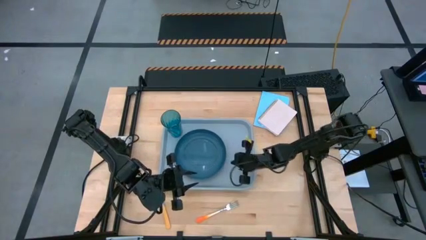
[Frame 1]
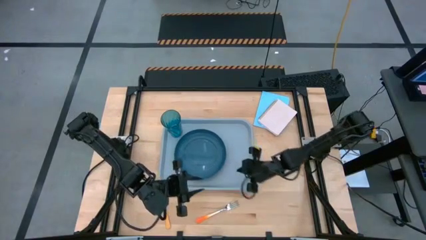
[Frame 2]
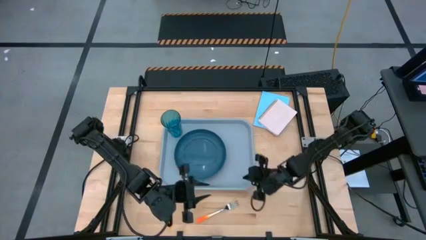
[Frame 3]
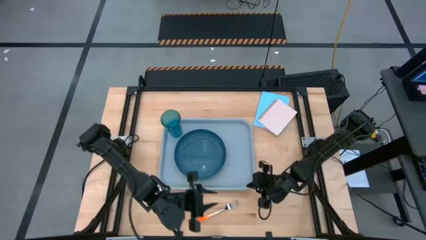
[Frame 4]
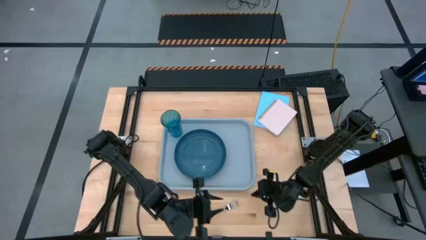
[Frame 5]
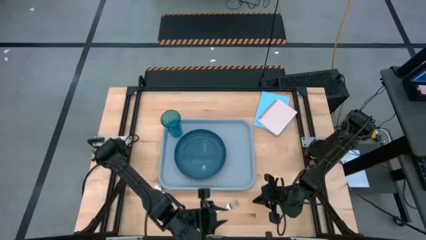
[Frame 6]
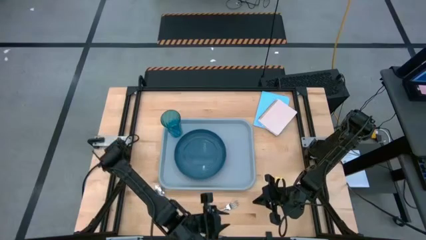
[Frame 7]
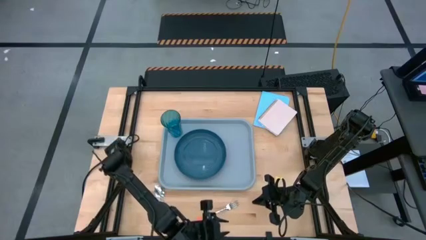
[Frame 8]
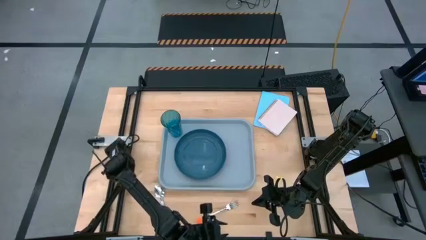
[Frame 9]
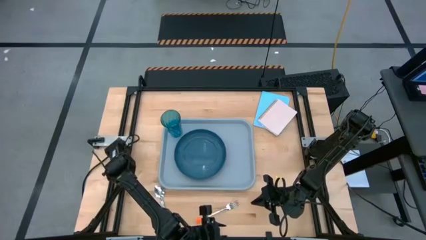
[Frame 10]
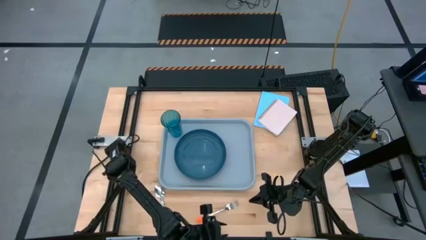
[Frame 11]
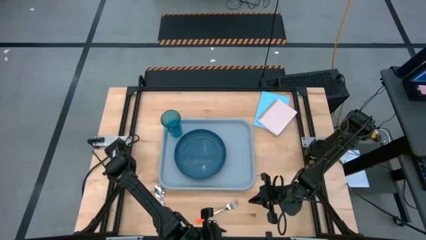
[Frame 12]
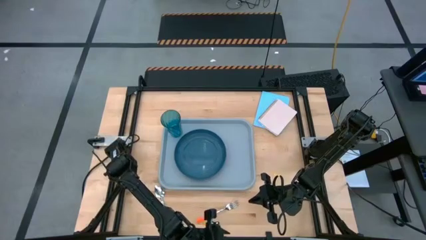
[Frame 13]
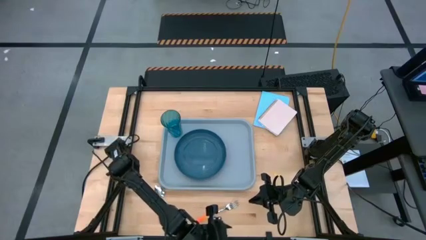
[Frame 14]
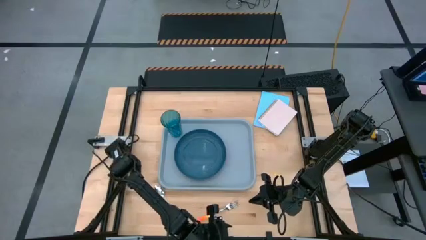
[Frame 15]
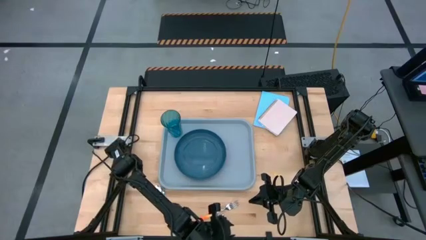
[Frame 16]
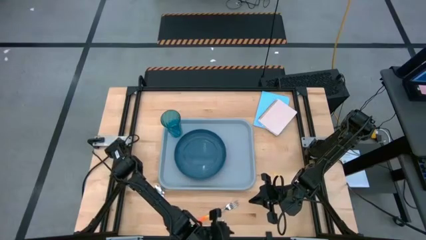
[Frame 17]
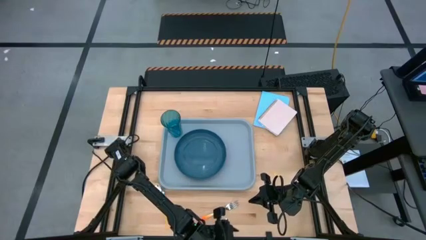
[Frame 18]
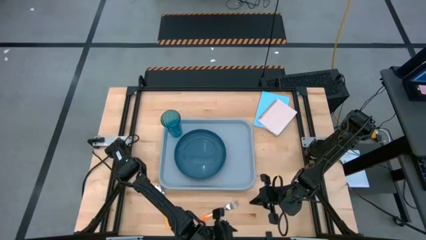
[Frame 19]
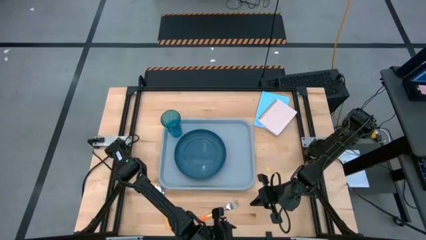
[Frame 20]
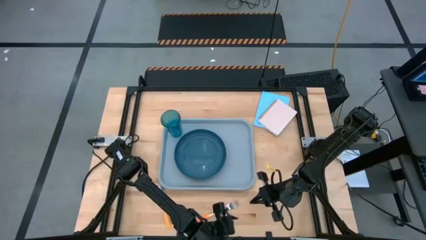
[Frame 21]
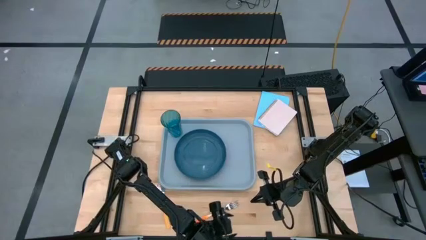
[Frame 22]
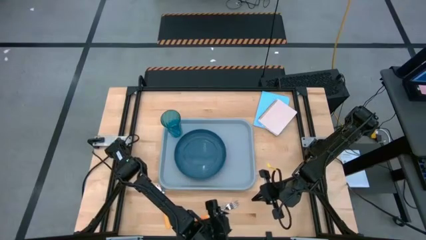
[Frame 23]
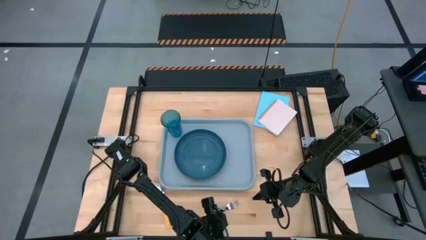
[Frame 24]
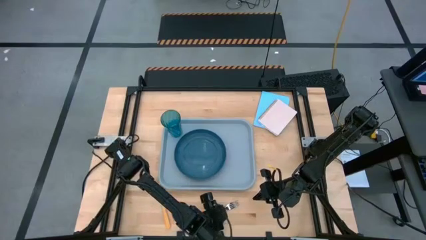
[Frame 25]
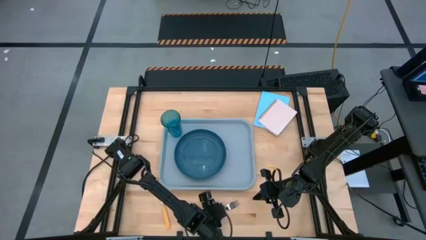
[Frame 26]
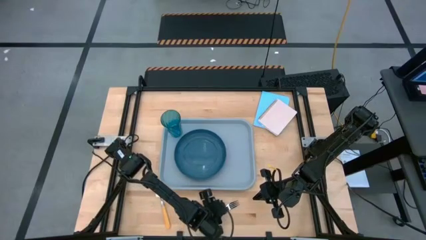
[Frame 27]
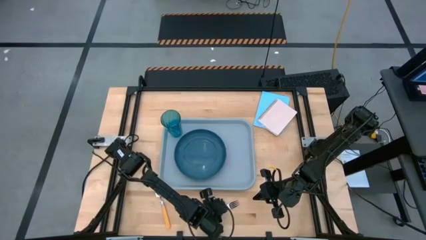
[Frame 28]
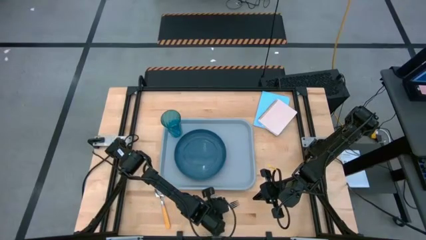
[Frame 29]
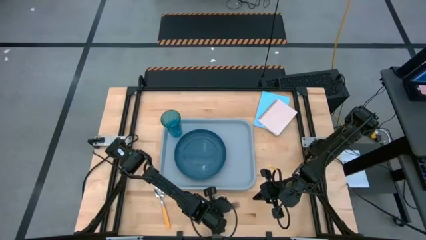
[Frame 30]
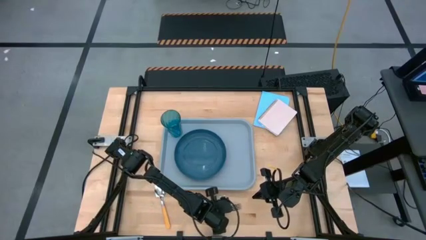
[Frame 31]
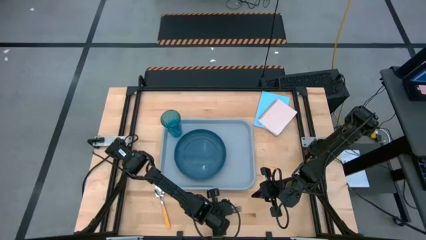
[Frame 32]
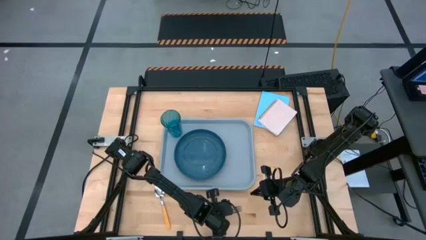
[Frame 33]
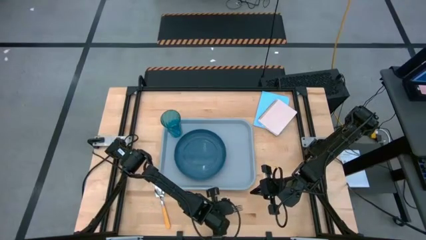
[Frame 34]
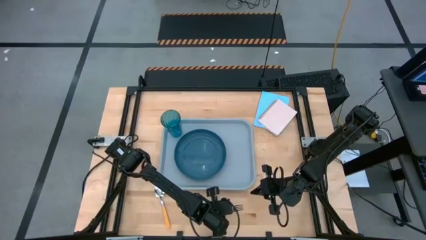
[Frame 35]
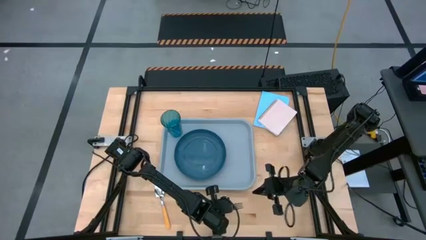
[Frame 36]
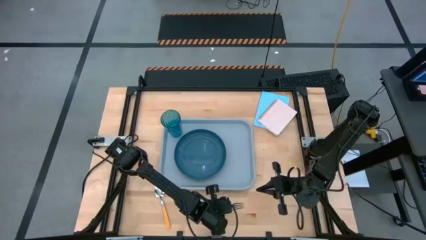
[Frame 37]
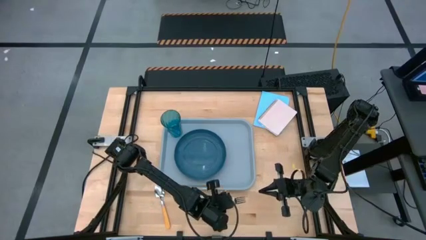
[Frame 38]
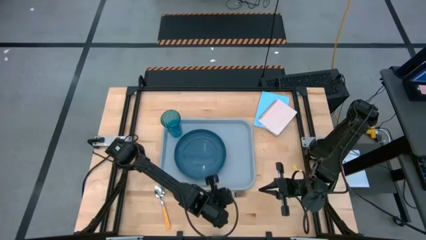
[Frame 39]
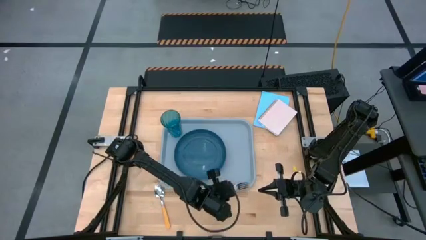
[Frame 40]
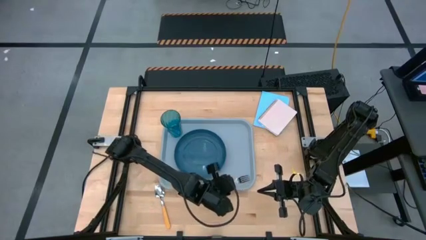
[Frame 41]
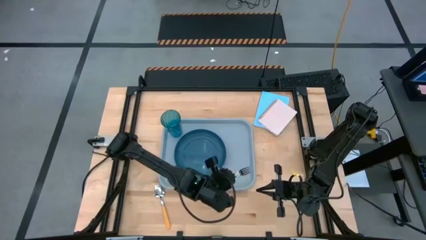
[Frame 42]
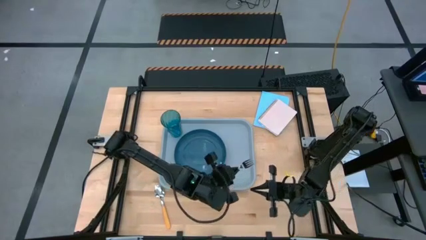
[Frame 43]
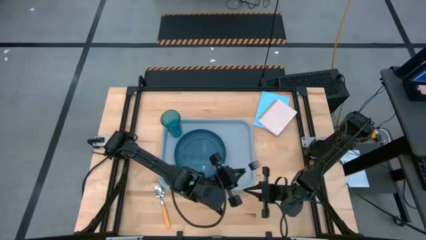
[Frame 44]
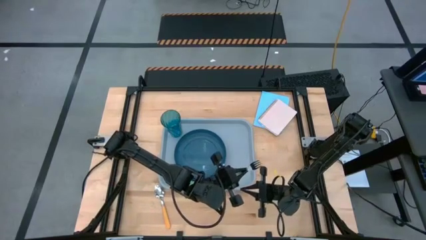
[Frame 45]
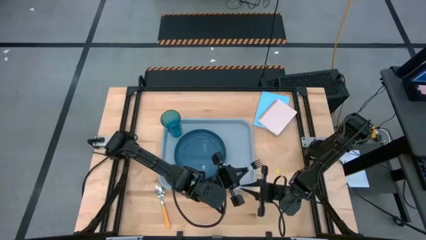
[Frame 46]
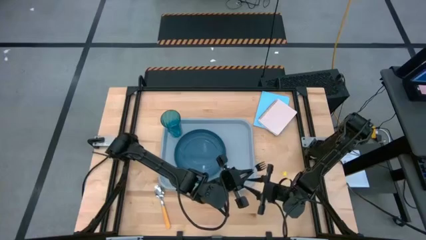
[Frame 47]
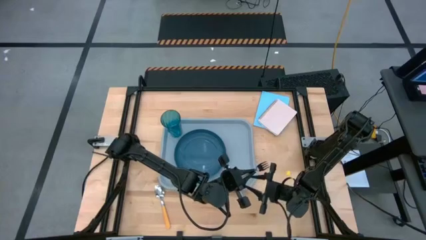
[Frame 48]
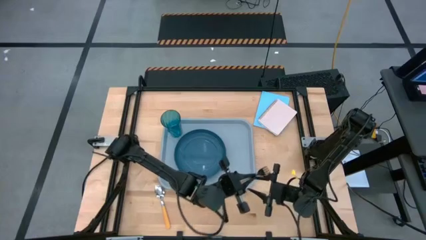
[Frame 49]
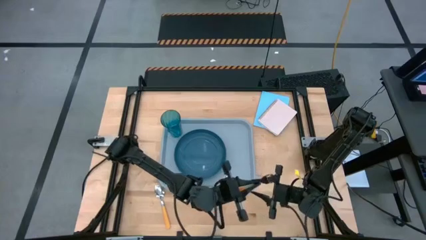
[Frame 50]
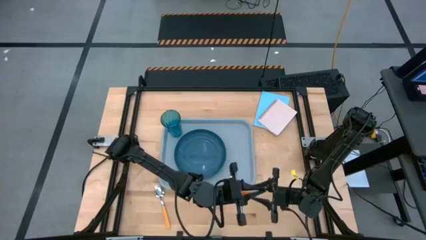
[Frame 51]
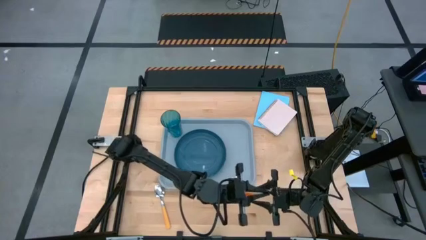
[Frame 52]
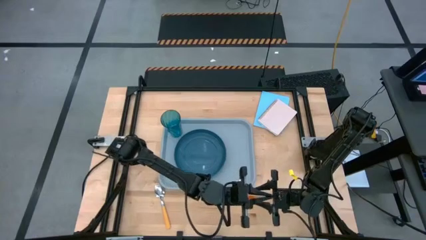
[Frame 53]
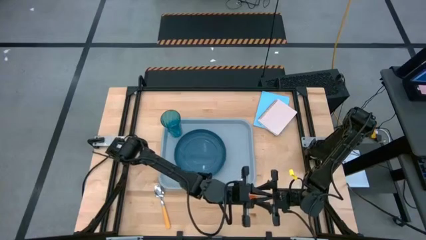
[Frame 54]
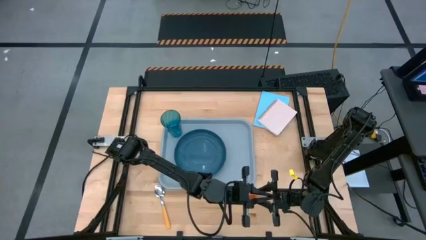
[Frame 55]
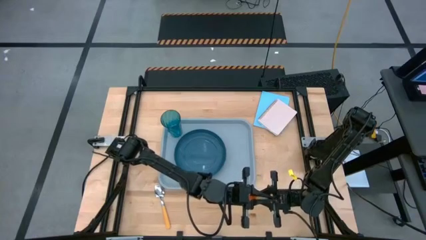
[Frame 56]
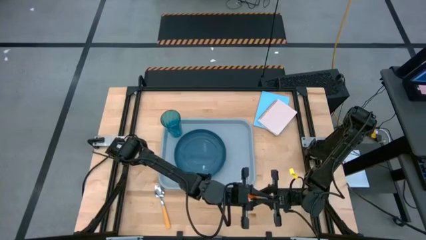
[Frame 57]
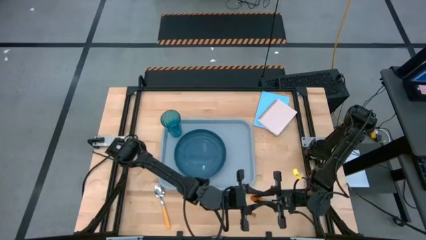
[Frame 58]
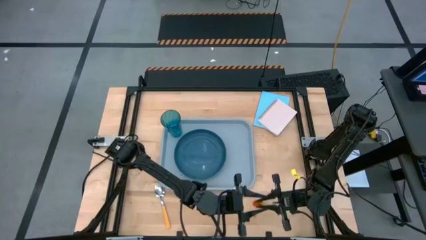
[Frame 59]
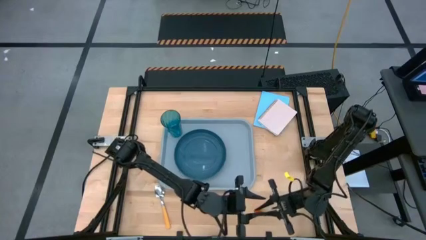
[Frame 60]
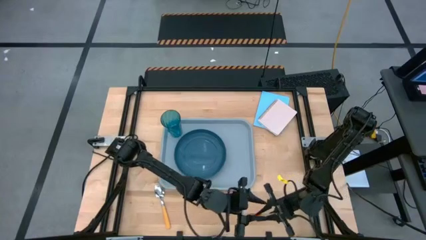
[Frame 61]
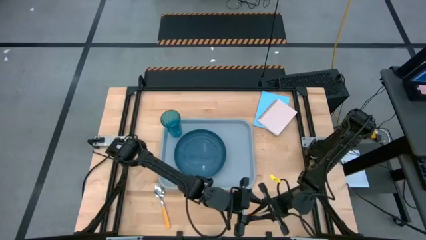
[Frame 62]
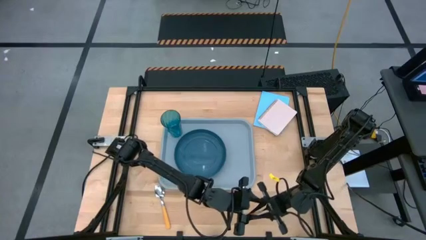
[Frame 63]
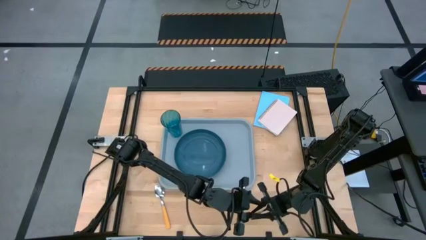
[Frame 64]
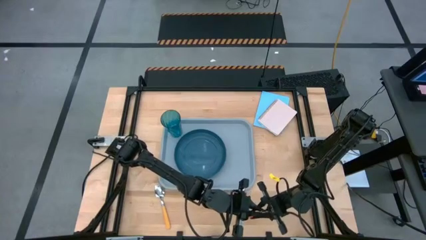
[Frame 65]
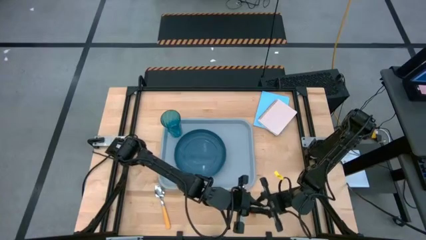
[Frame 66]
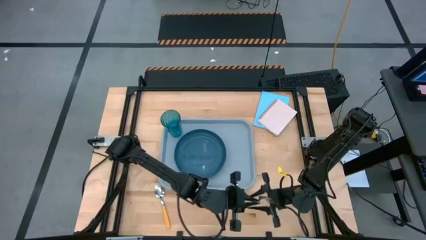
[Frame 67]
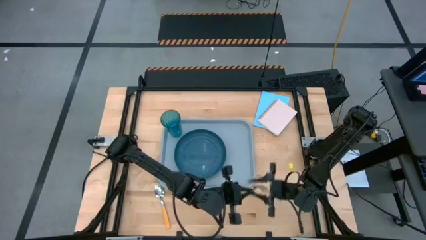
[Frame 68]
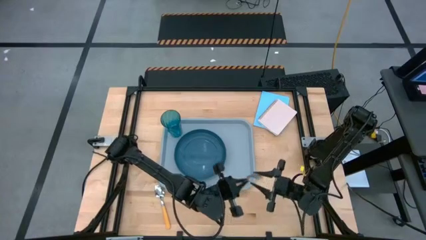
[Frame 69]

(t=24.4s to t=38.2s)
Task: Pick and place plate/cup/fork/spoon on tray
Put the orange fork to the right of the blue plate on the gray serving tray

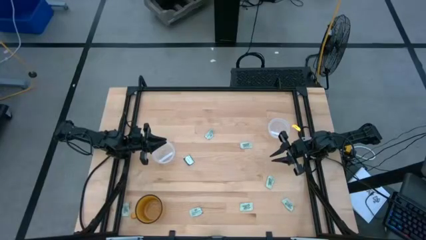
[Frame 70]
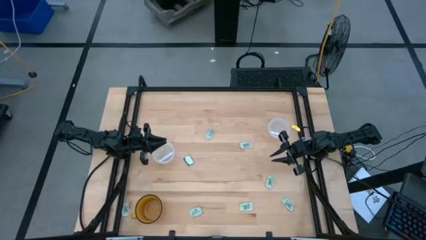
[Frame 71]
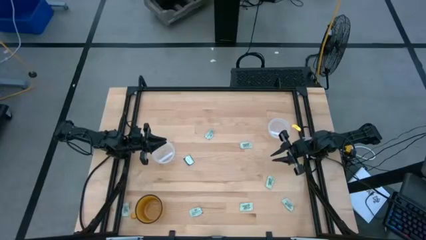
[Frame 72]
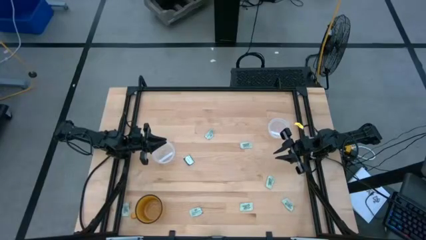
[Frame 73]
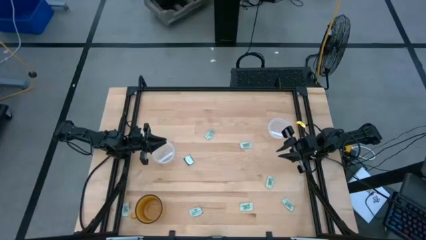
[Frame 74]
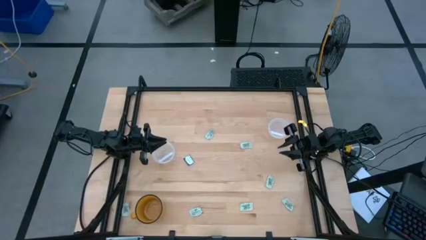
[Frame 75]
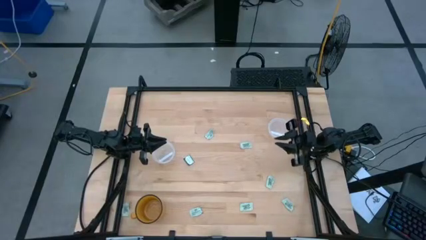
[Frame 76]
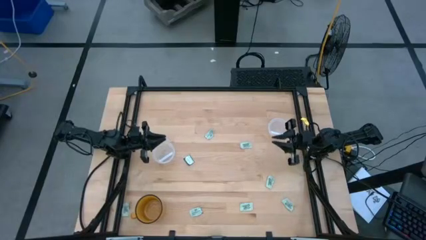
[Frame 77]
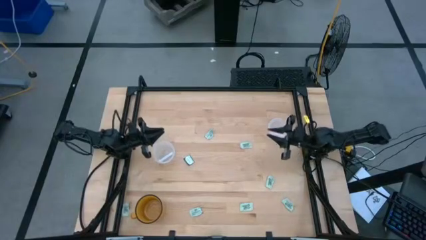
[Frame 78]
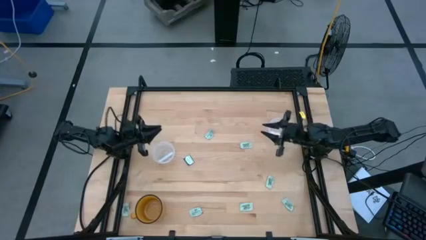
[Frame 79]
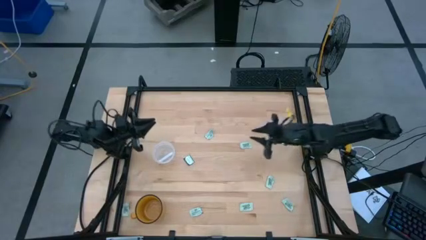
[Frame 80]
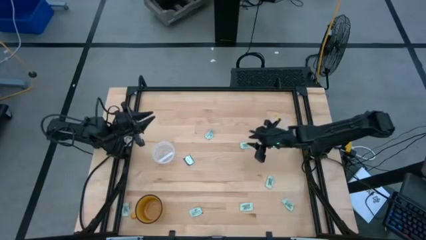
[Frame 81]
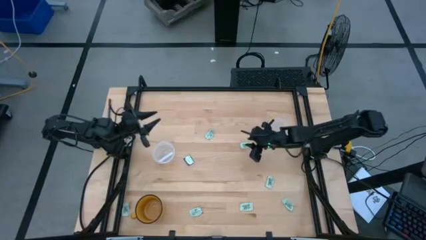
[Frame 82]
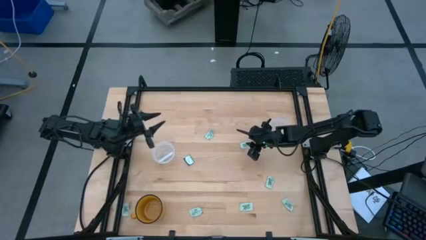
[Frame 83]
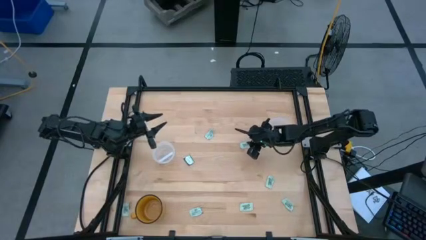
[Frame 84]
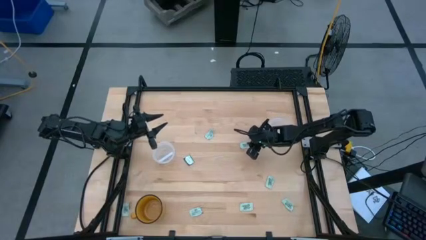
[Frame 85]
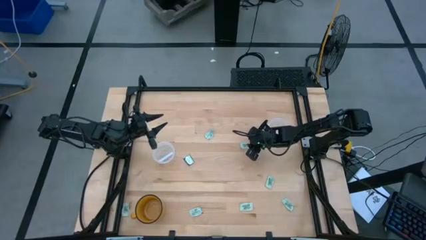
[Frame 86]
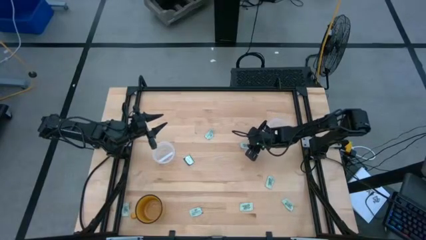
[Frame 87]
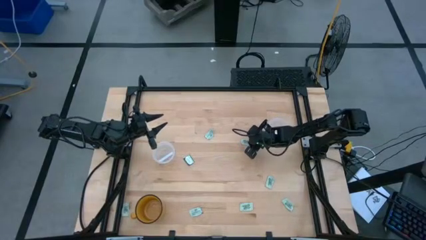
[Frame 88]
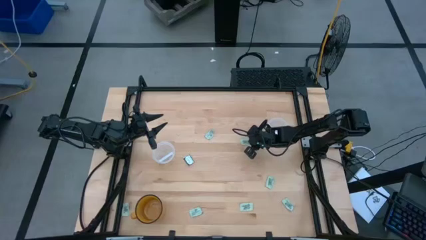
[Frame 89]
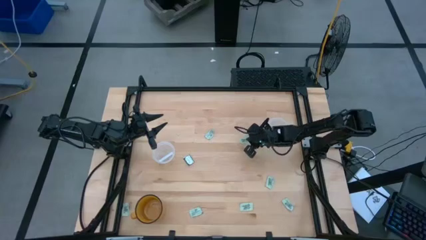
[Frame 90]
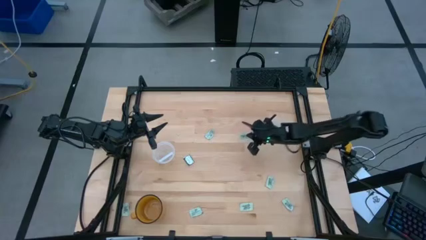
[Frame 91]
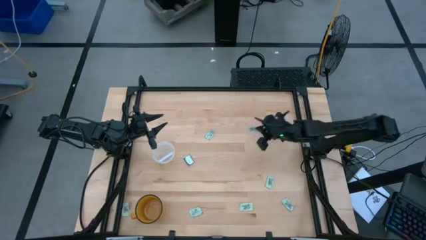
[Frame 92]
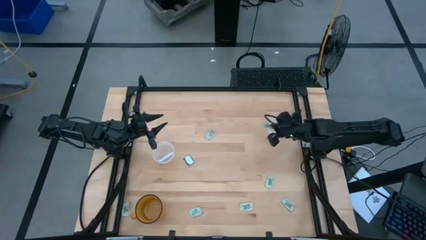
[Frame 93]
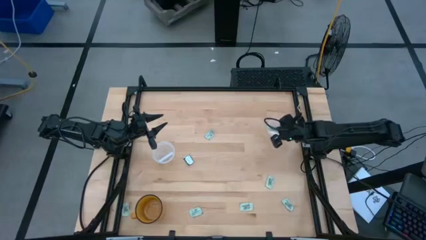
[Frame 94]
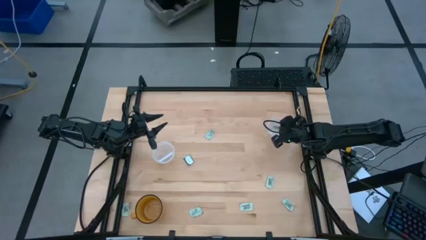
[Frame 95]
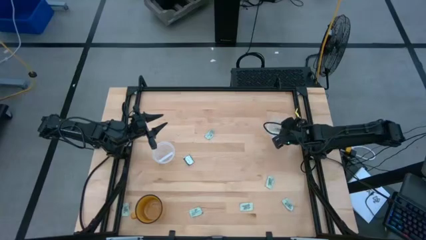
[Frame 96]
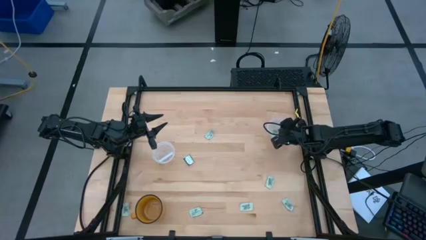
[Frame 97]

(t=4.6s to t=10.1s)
Task: Pick and place items into bin
Put the green stevia packet into the right transparent bin
